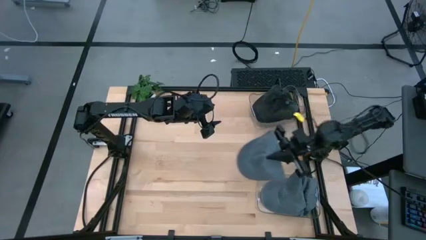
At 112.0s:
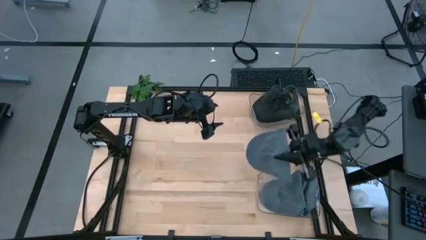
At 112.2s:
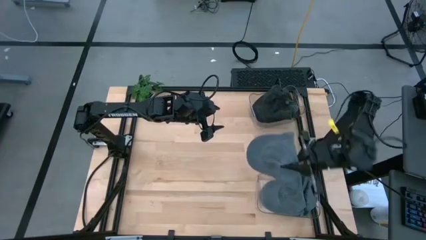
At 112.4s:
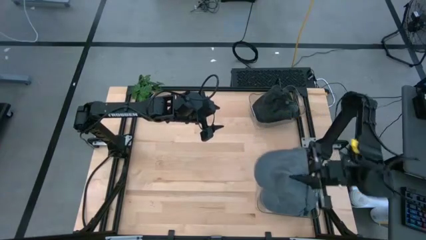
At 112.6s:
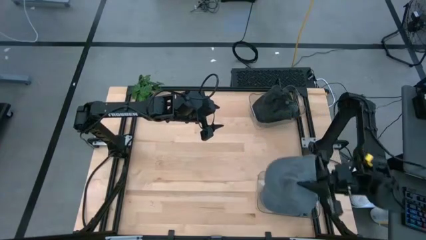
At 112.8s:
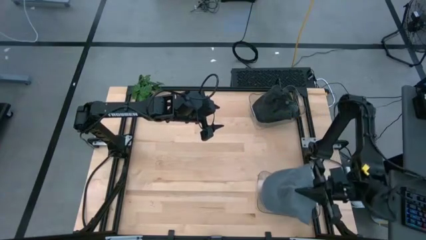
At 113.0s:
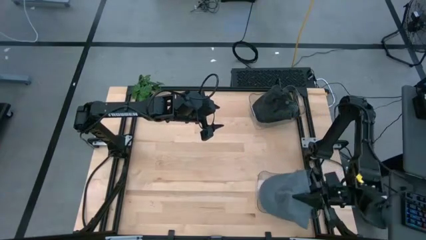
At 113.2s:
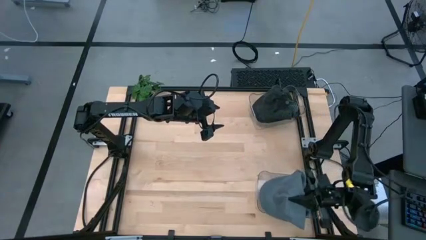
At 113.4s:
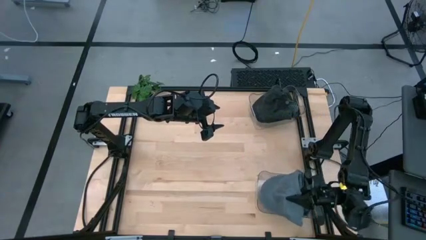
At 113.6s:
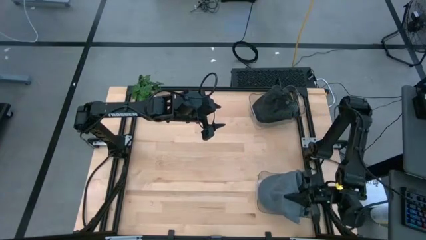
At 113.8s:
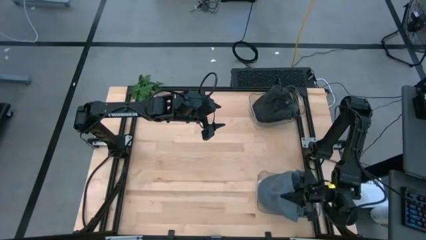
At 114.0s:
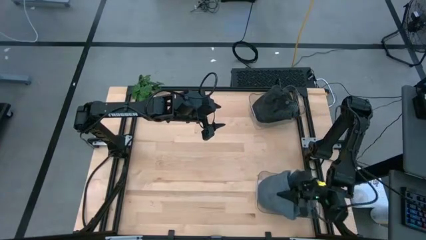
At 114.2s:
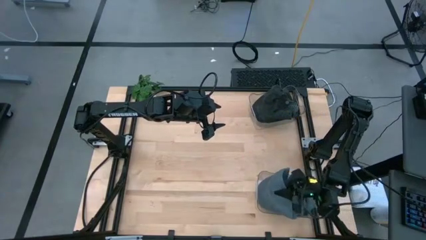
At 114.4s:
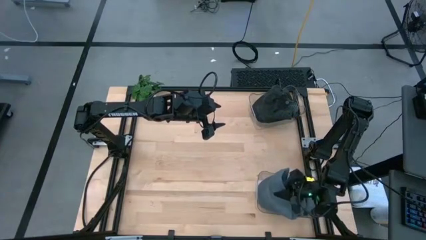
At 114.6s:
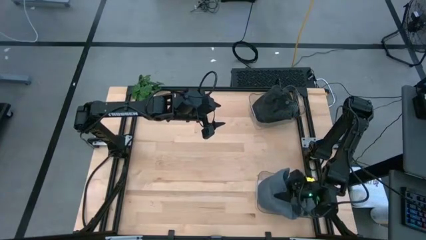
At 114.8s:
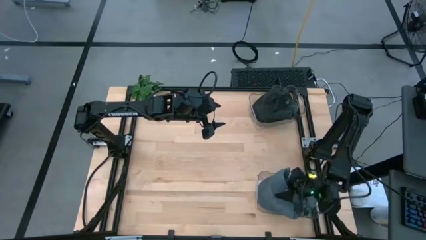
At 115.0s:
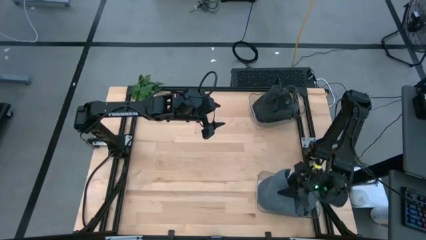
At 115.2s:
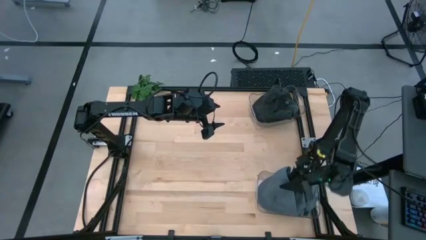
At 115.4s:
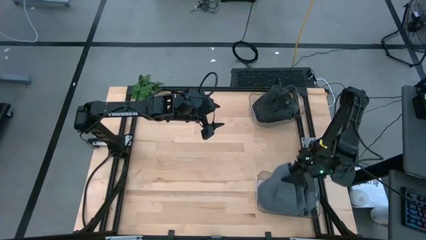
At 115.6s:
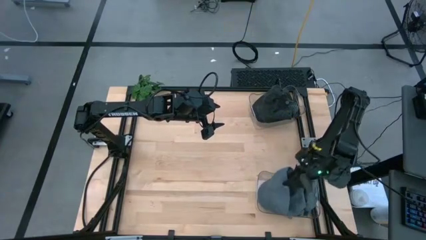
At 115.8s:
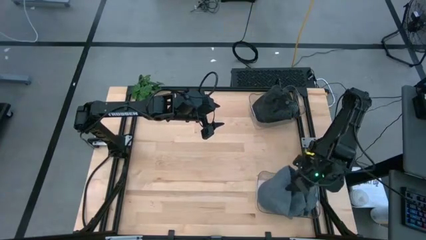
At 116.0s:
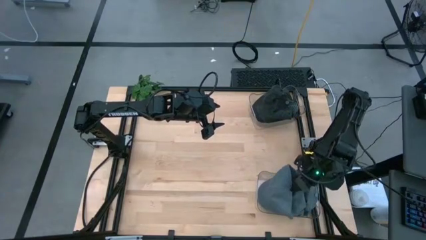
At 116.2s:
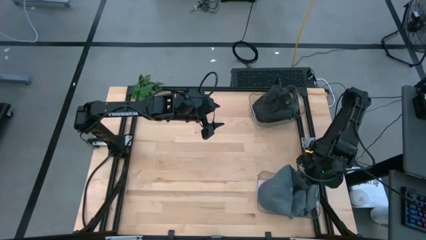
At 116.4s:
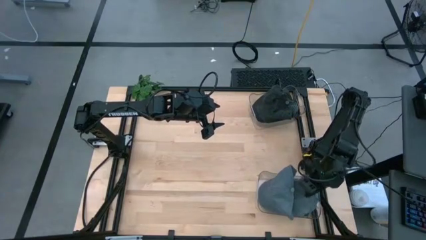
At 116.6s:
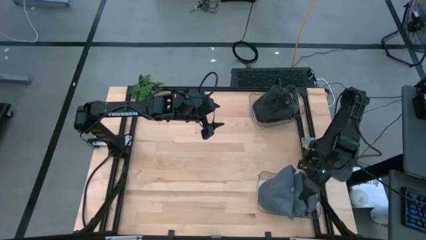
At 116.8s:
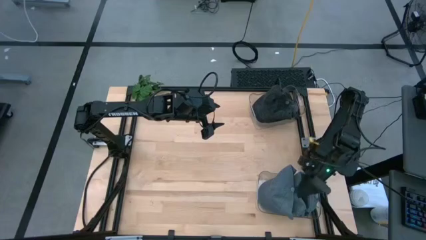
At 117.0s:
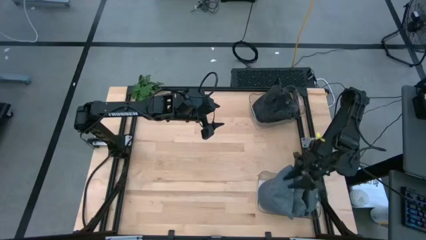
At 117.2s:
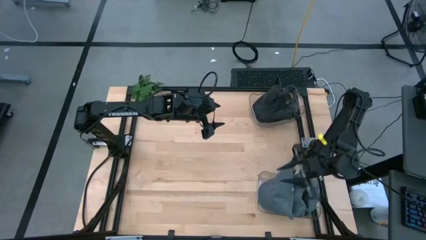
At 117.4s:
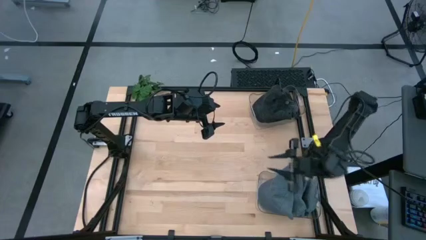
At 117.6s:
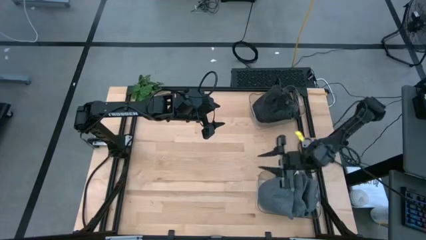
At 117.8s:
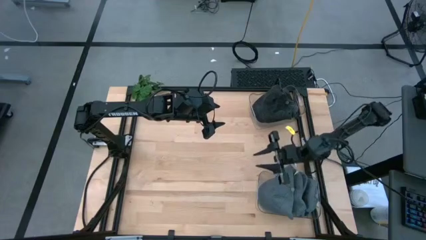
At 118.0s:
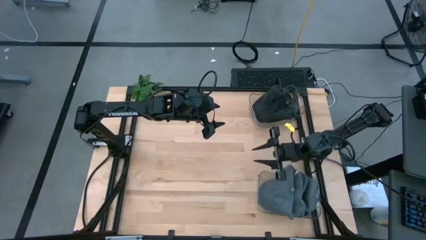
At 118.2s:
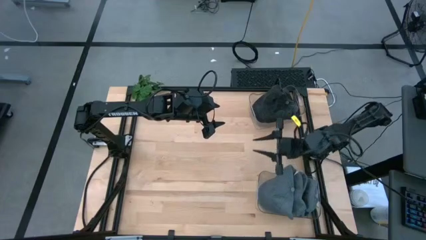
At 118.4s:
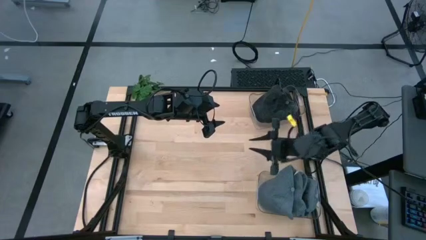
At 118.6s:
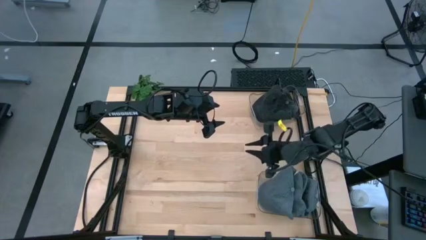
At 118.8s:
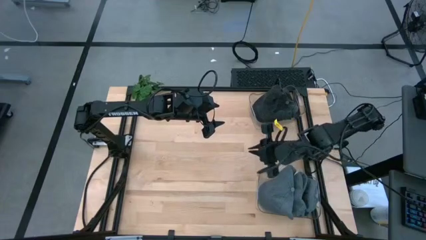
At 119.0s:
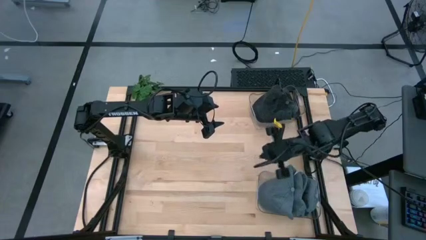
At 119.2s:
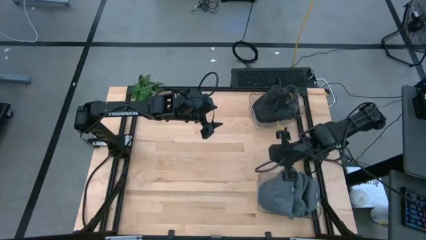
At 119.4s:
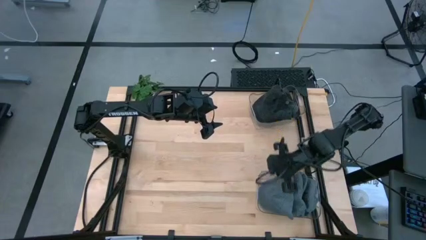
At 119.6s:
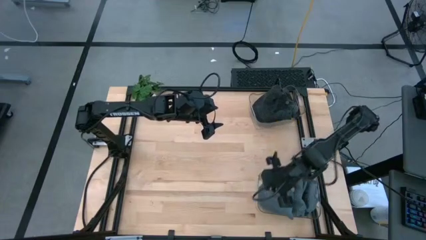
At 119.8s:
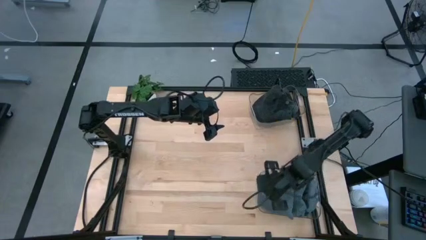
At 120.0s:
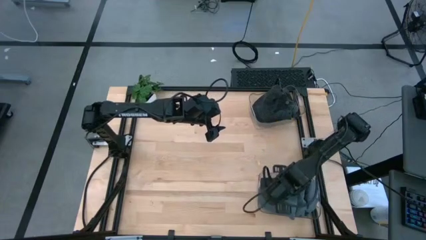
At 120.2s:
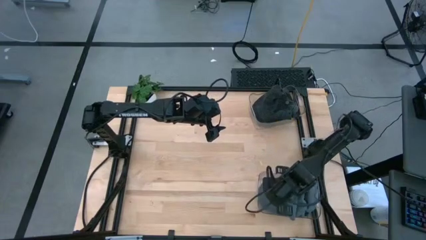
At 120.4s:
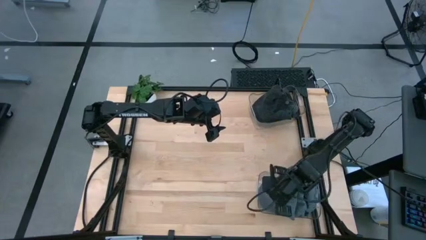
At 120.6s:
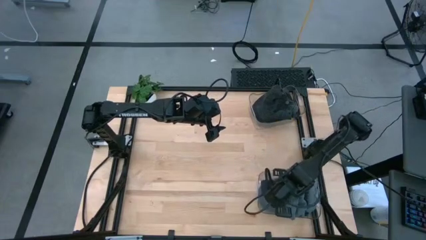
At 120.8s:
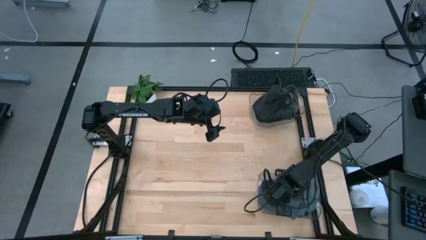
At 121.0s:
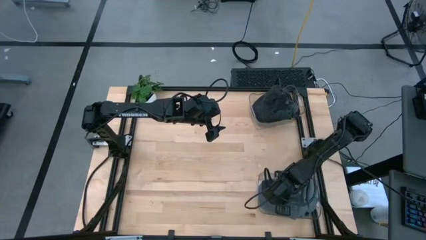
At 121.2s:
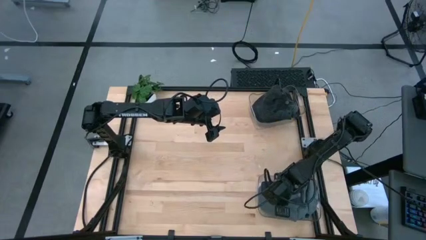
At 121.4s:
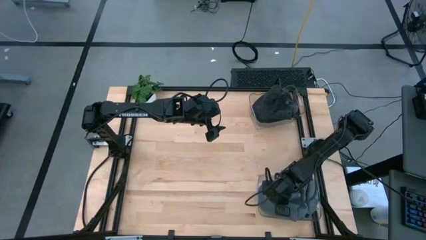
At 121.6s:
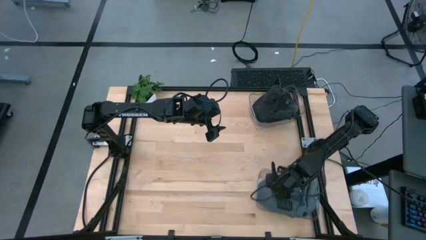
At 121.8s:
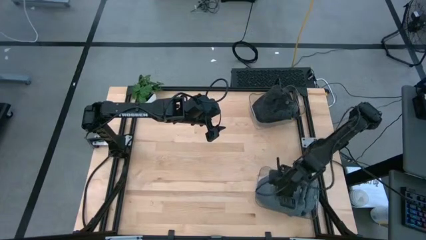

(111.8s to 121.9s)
Task: Pick & Place hat
Put the gray cap into the bottom transparent bin
